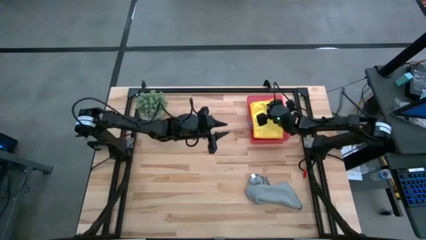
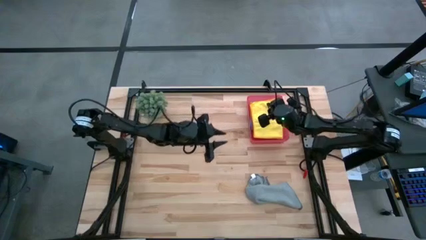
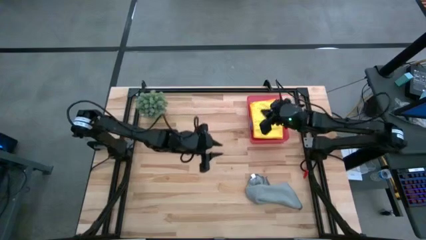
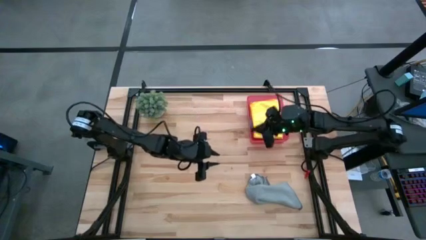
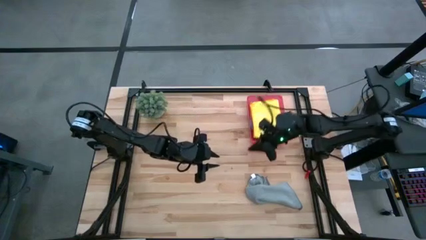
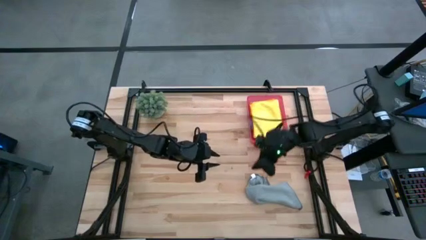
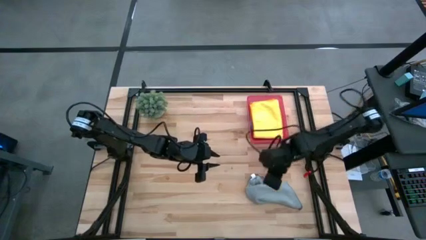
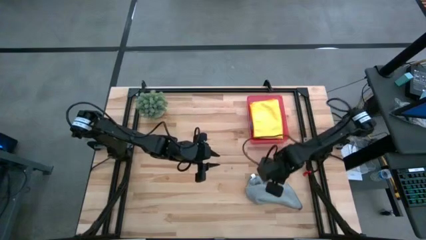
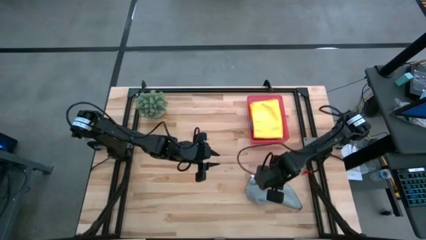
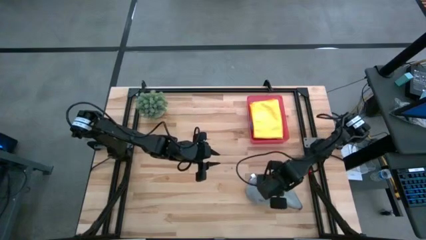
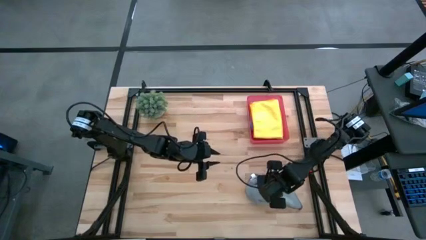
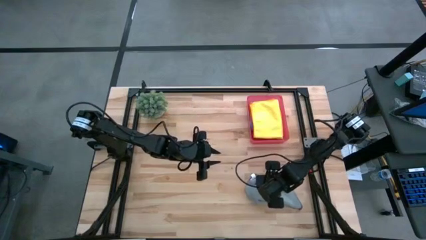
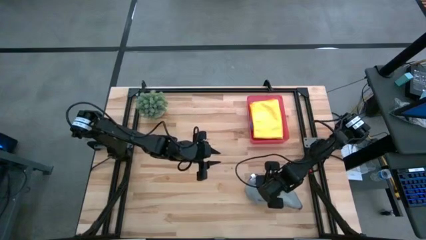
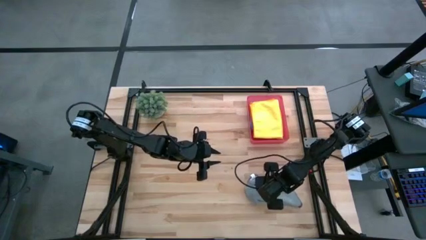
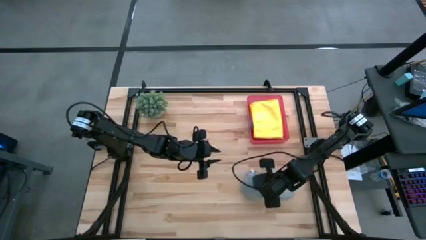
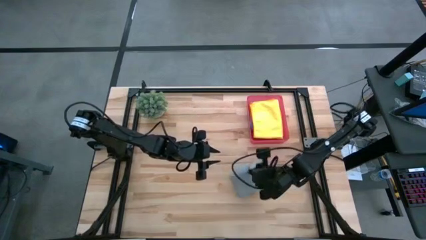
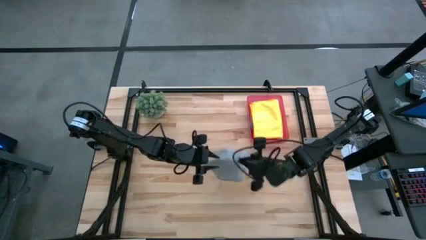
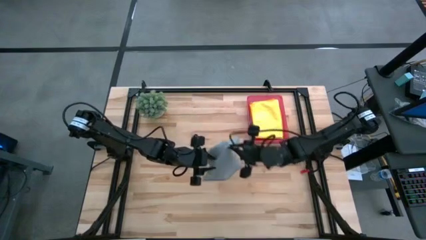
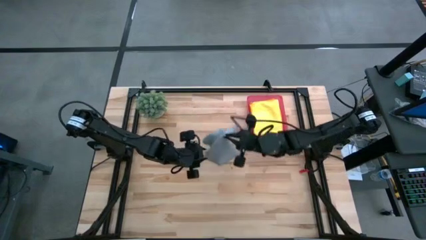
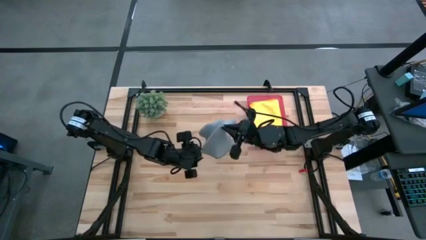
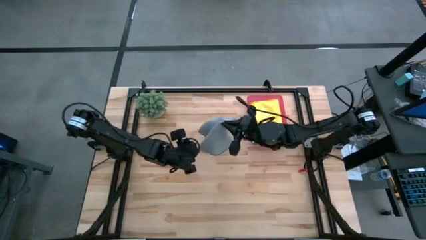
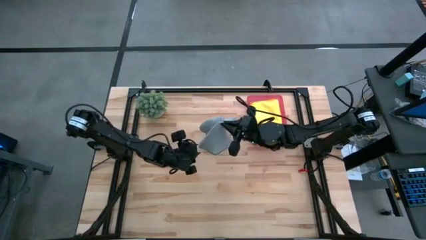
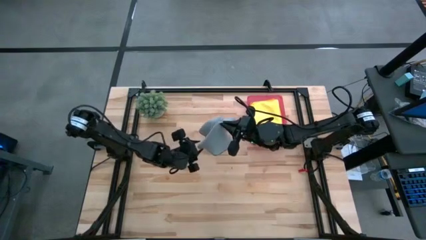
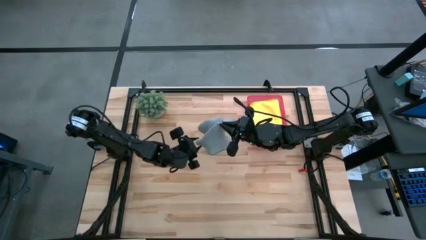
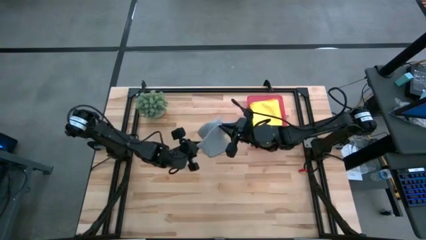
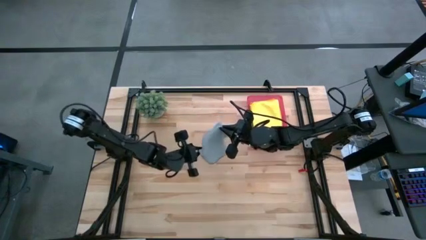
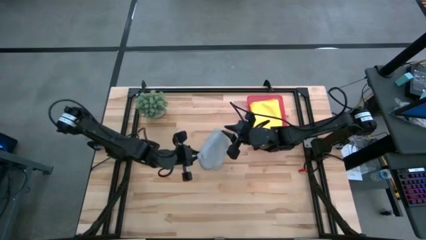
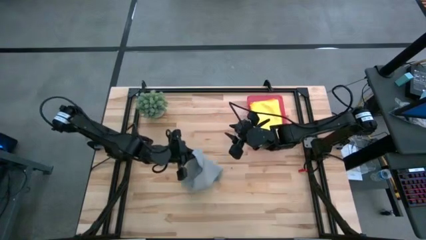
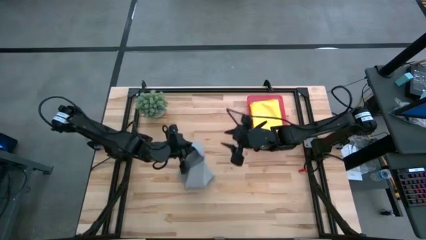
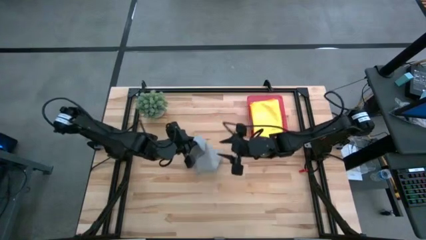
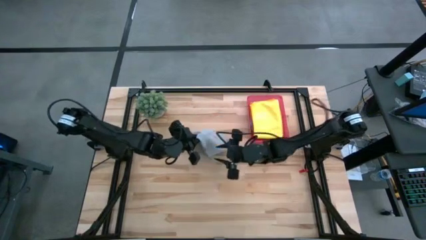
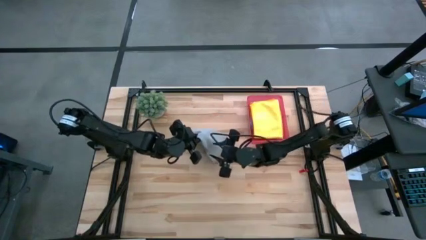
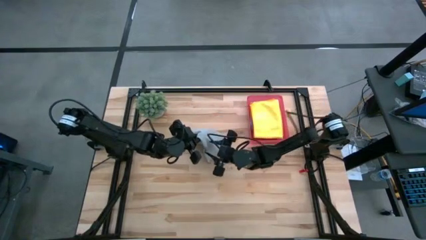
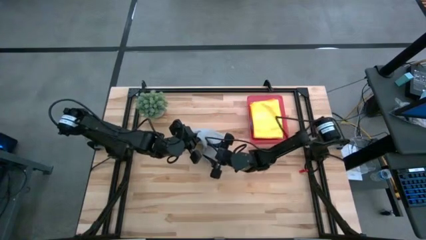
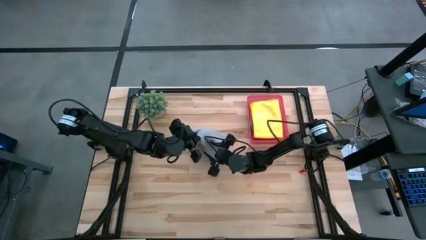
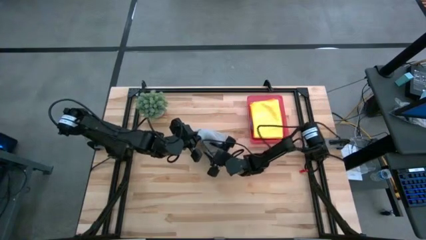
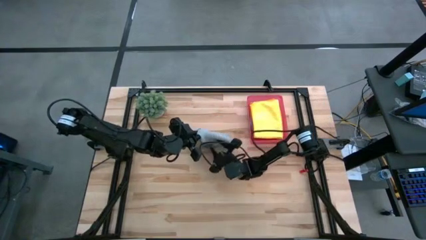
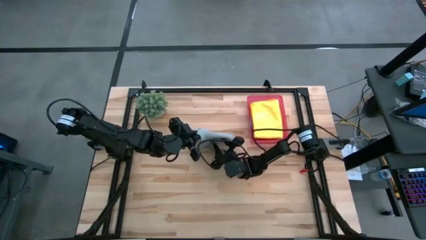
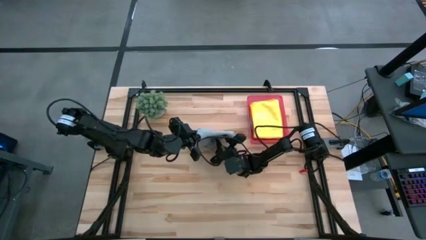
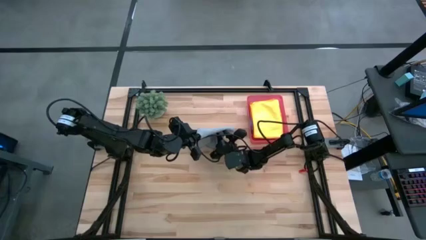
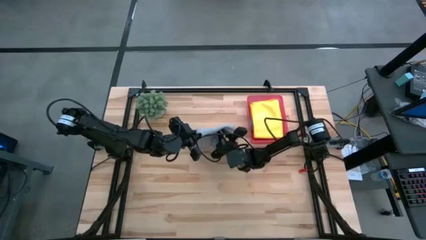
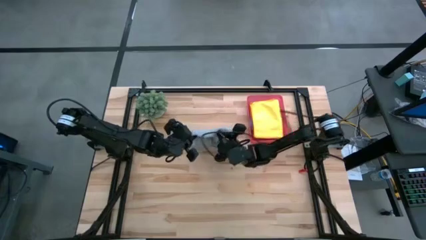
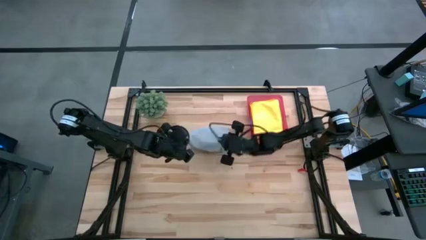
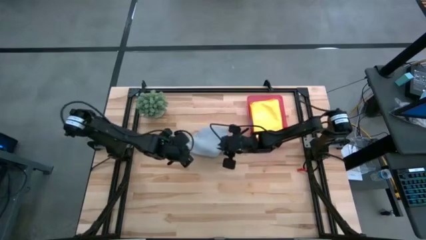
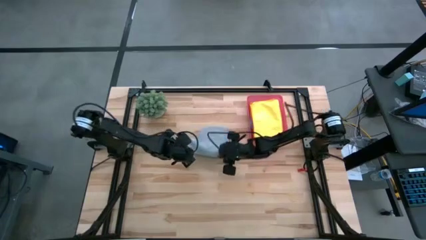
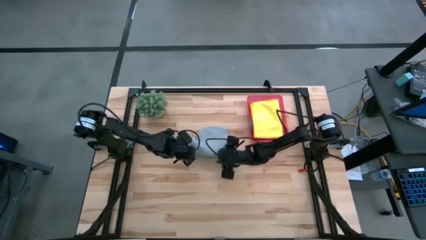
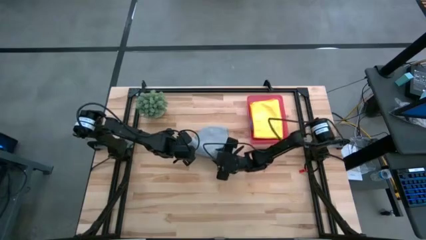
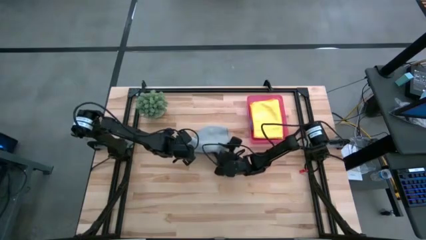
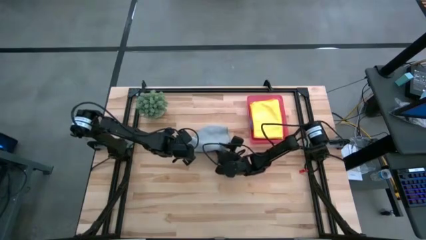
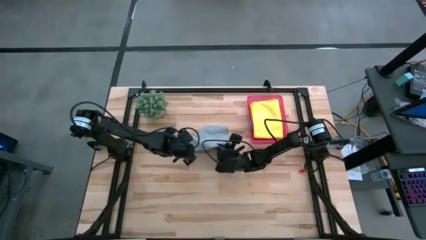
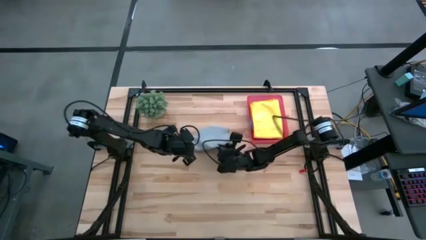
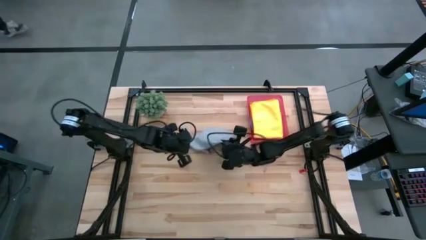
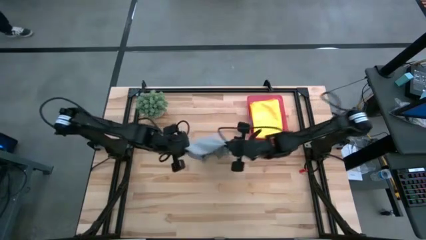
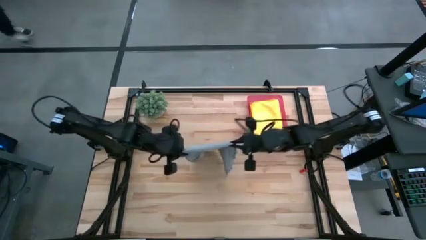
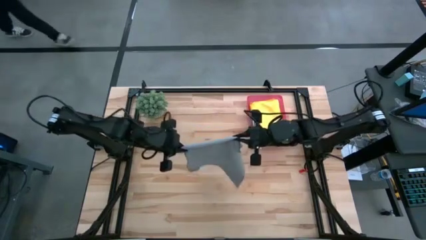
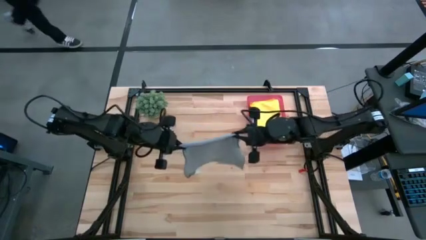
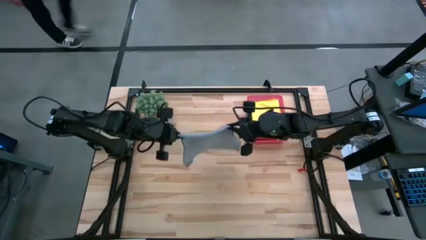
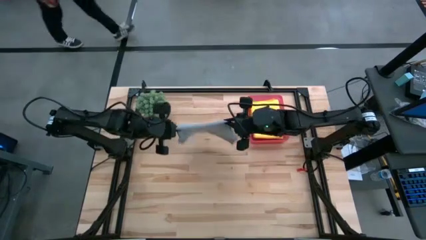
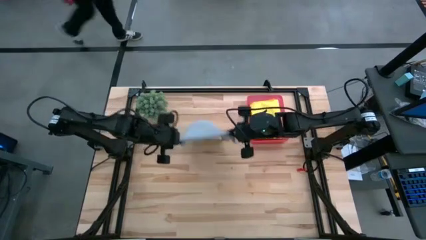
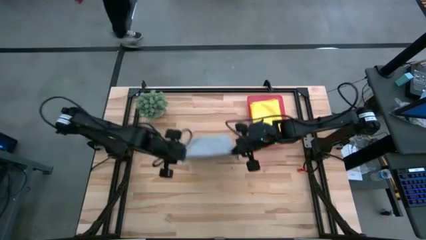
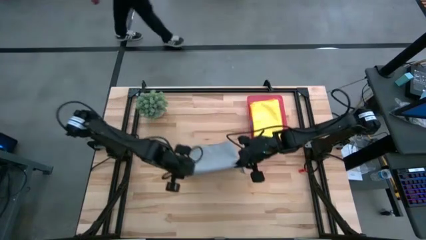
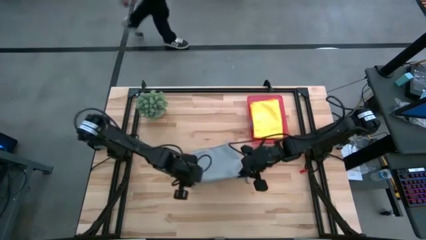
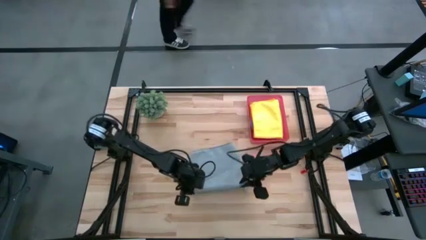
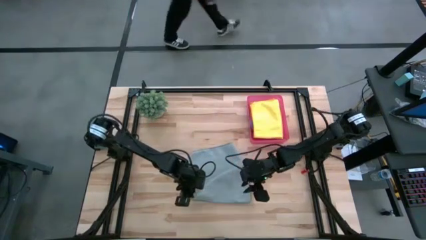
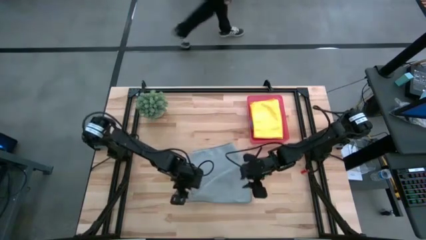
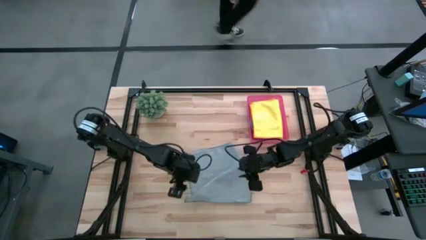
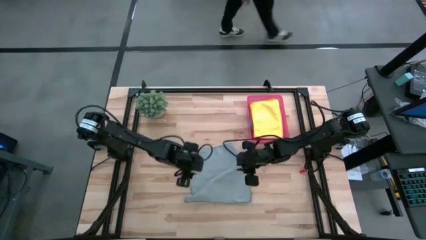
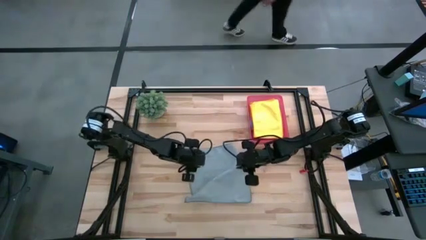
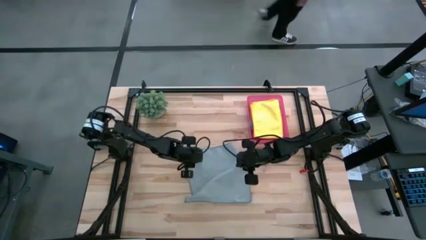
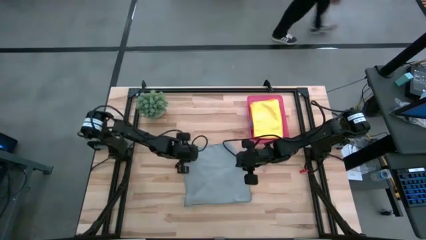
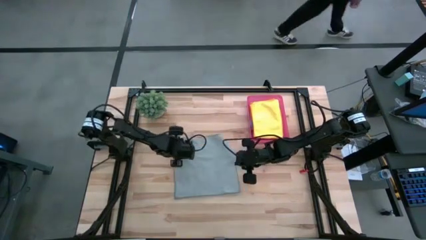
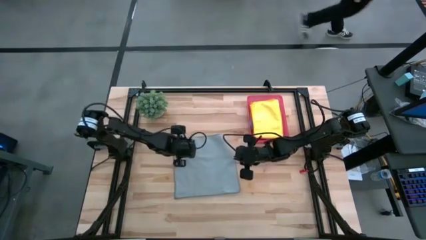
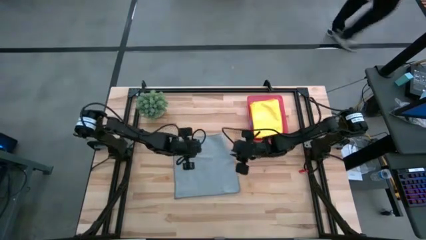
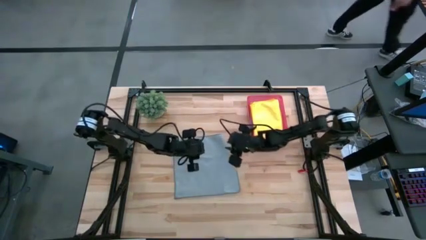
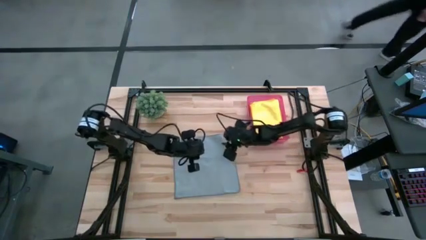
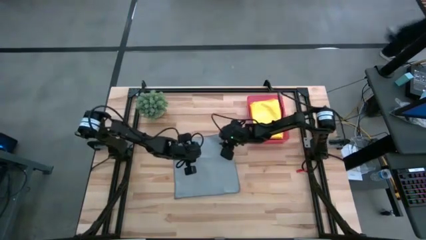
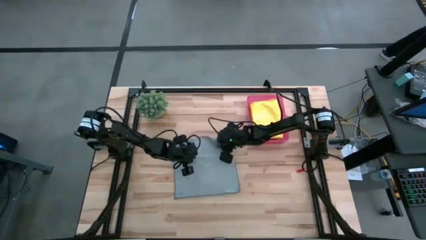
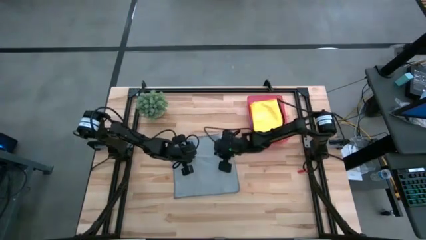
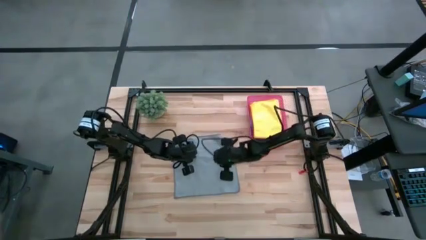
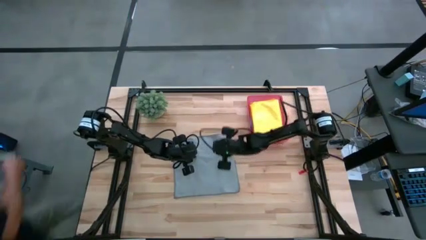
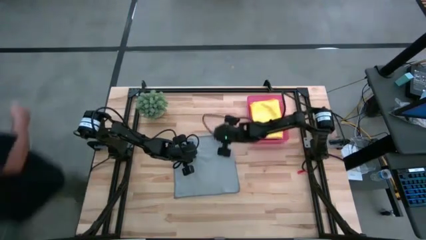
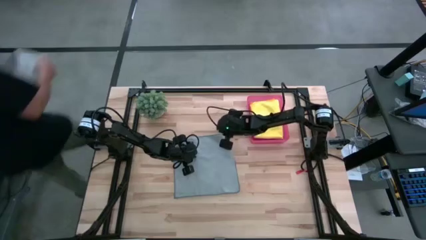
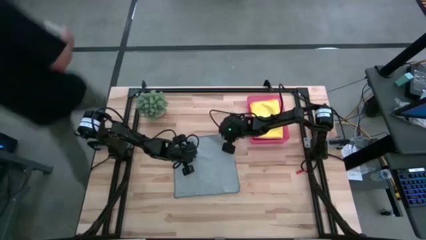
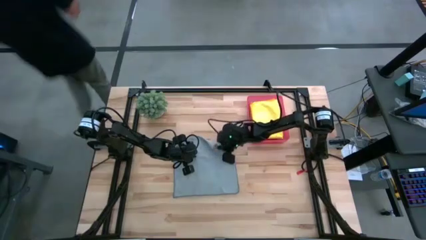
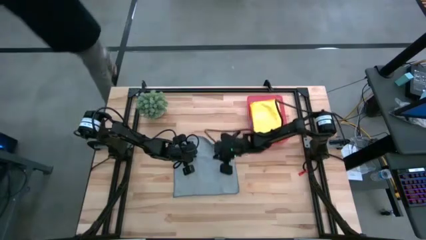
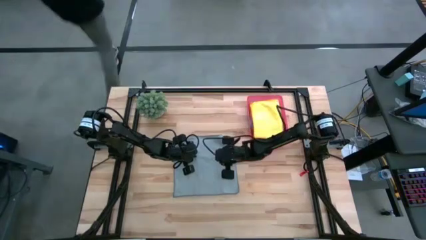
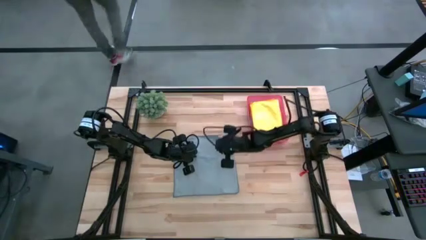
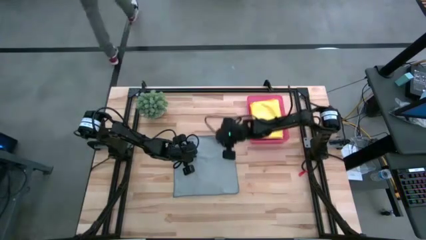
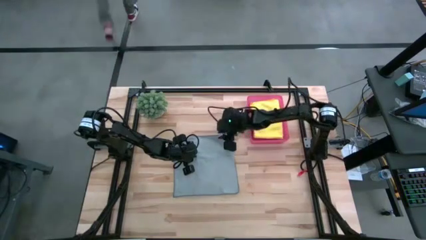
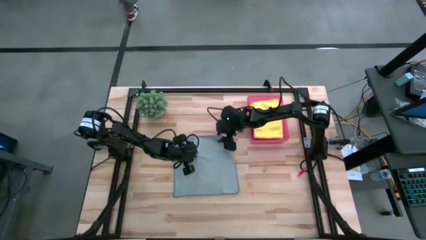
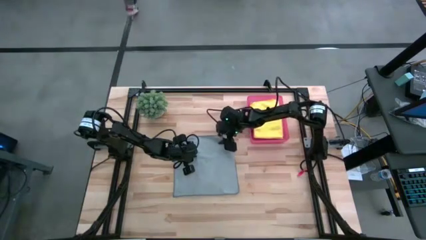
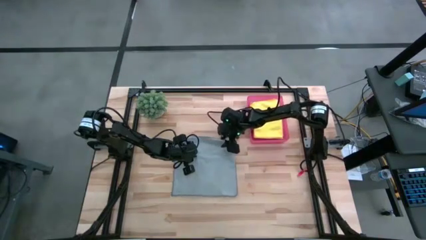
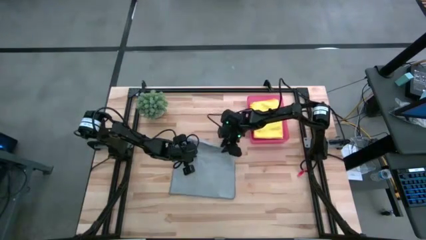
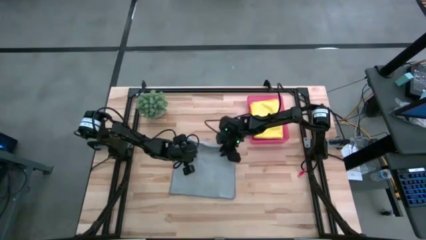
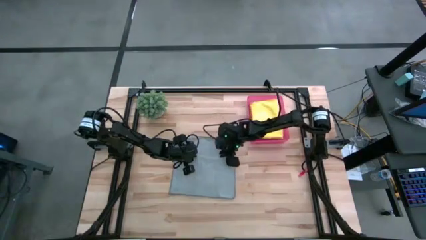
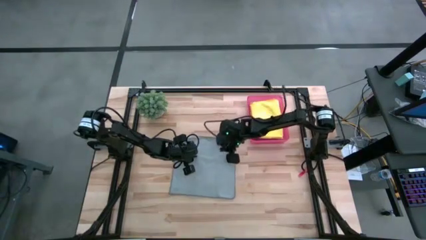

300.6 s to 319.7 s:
Task: Fold microfiber towels
Fold the gray microfiber cloth
